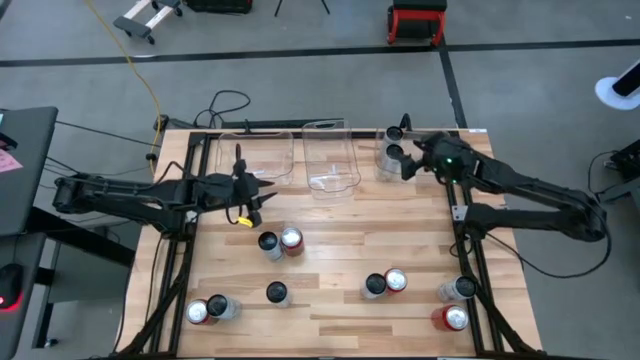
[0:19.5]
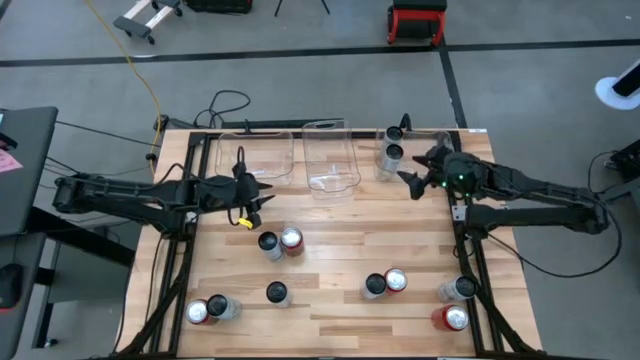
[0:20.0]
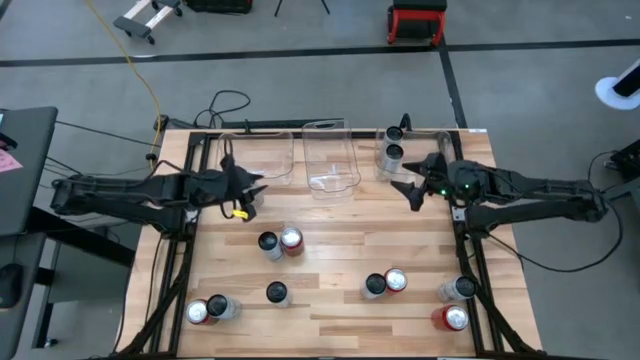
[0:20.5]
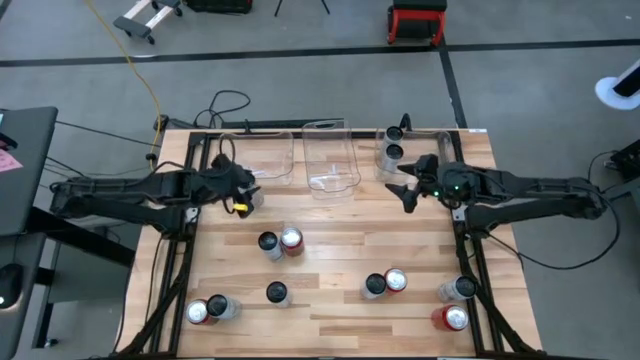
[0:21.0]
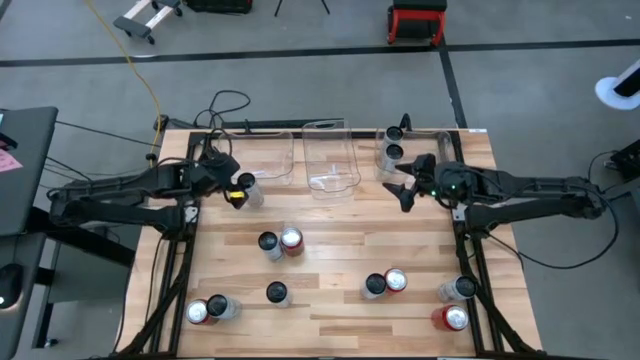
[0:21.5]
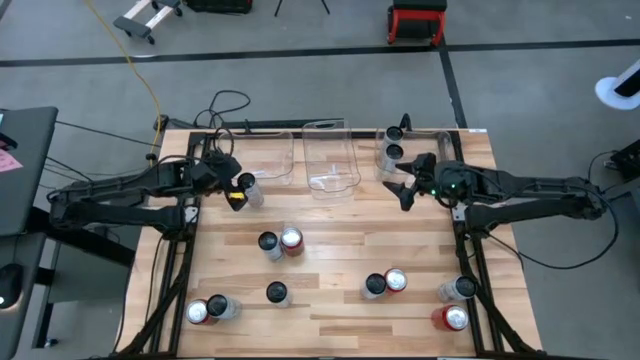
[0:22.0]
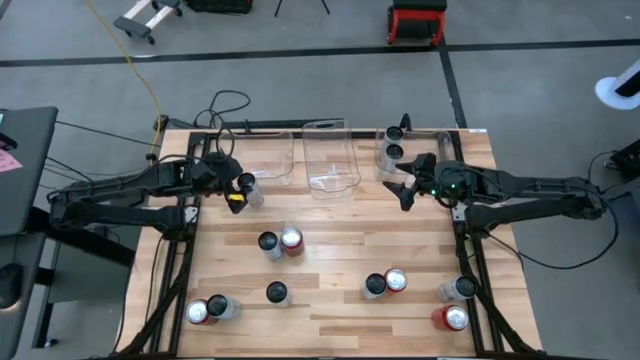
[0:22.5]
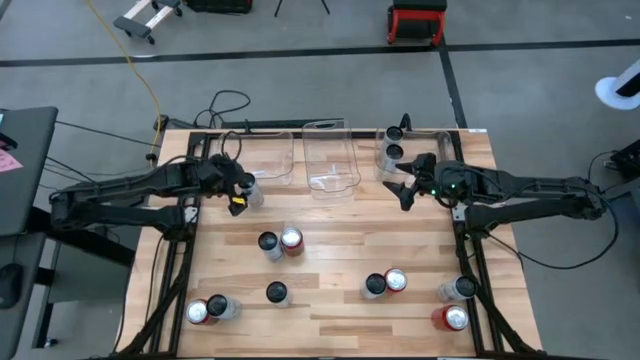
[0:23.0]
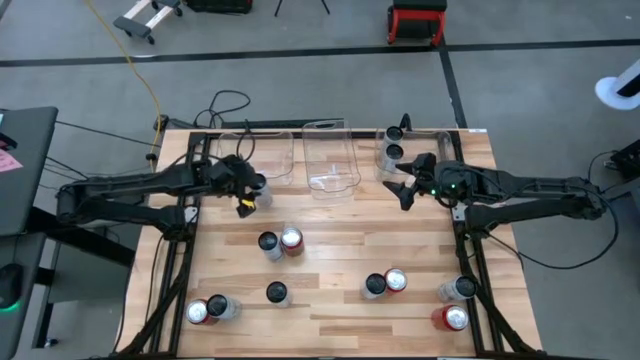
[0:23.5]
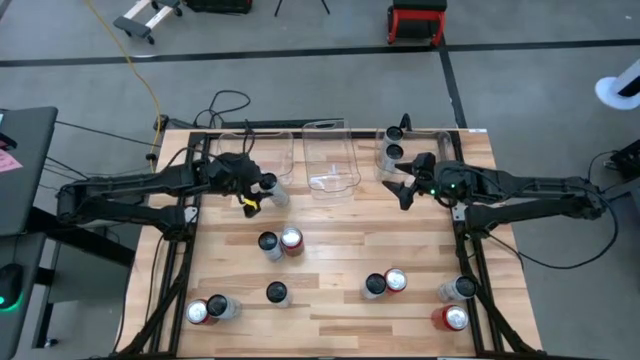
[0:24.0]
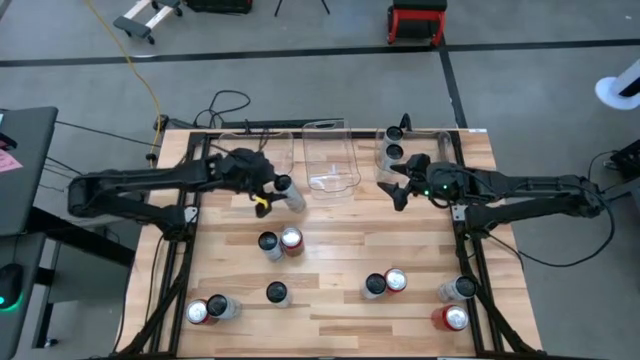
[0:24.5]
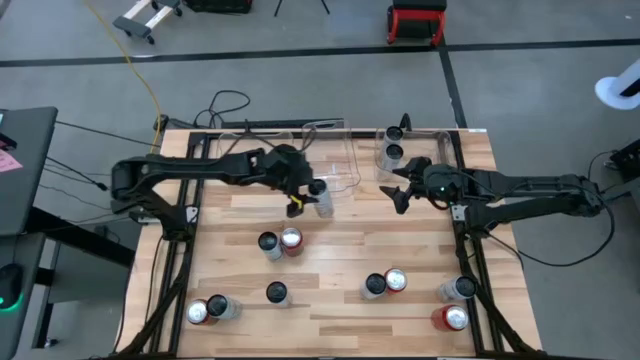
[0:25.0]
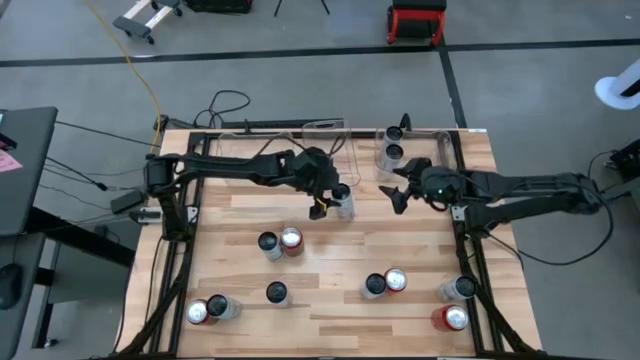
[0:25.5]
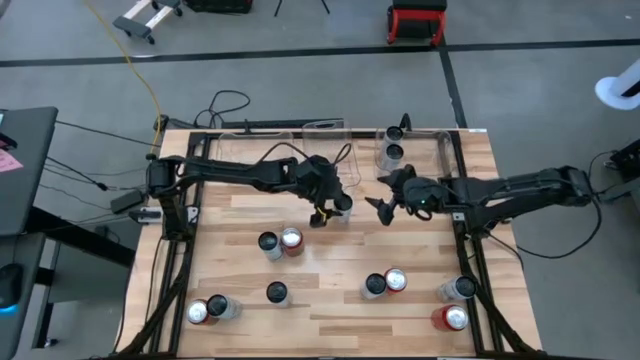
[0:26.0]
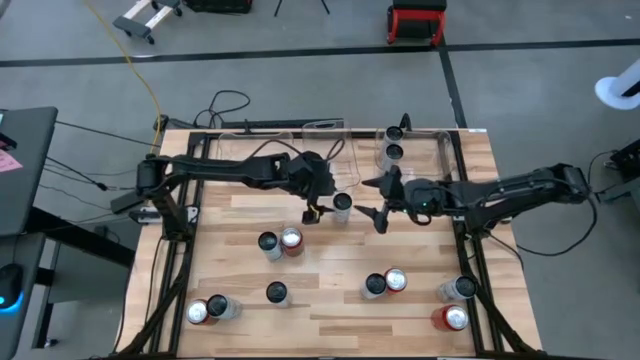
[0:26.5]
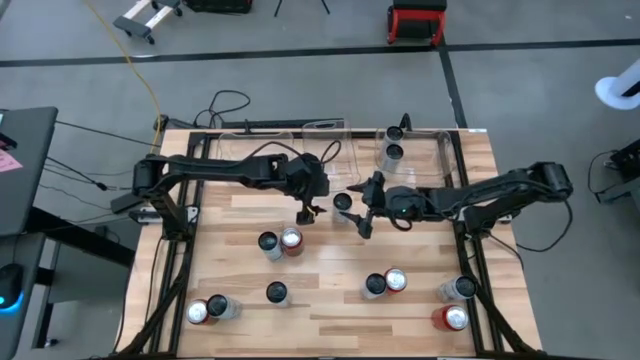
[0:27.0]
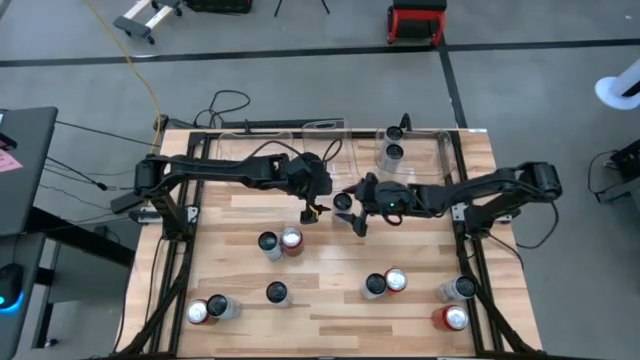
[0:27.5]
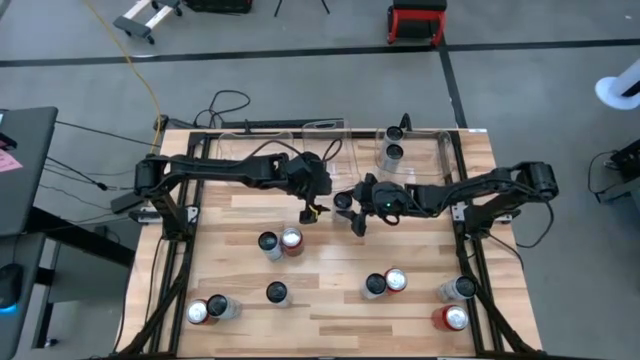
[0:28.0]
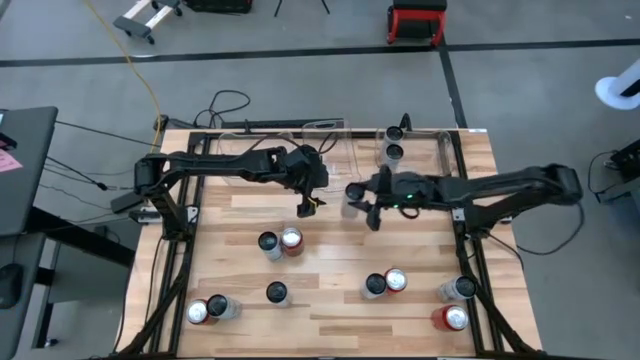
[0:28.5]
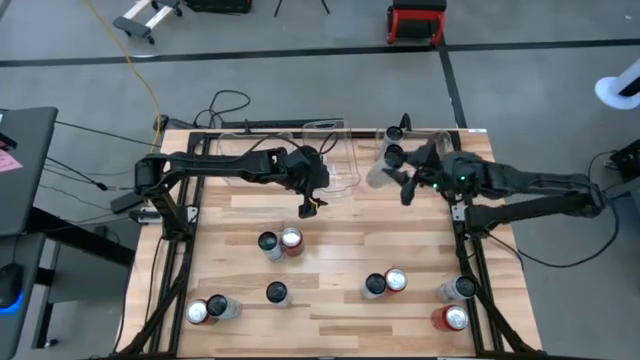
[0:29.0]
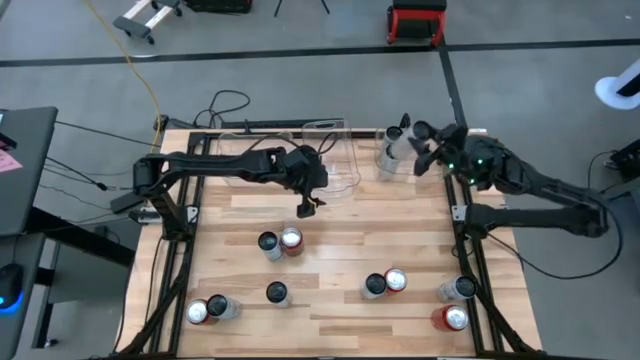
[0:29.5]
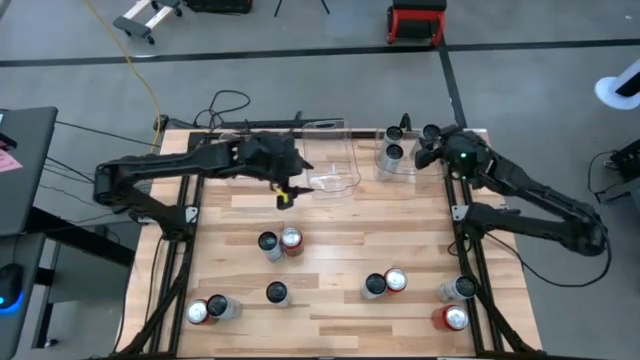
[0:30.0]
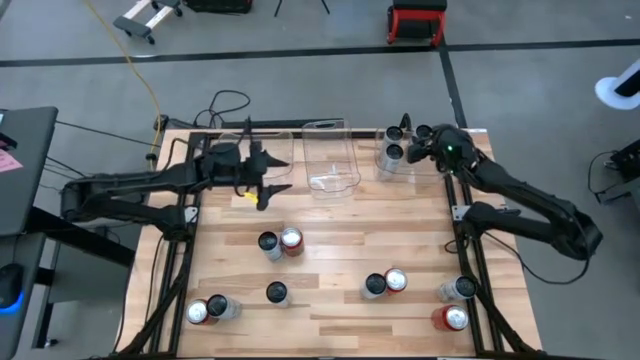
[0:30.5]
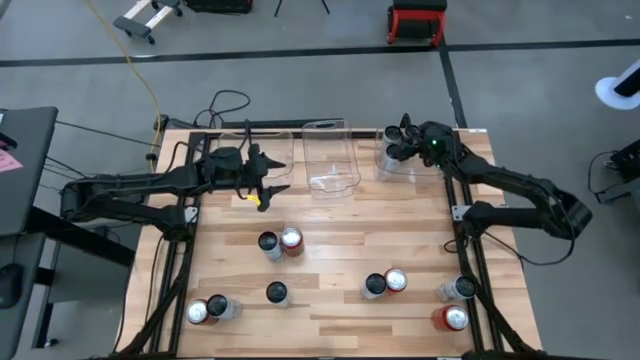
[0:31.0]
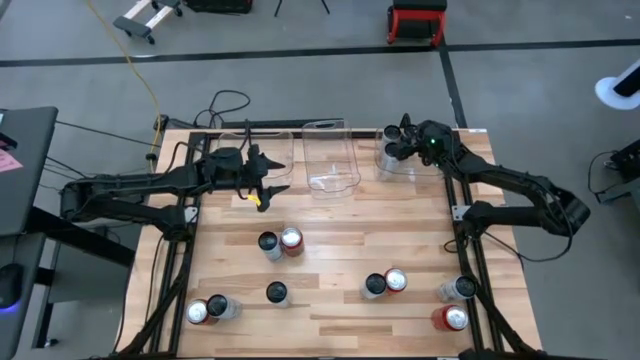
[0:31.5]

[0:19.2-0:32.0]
Task: Sort soda cans
Put the white-yellow soda can into the right transparent bin
